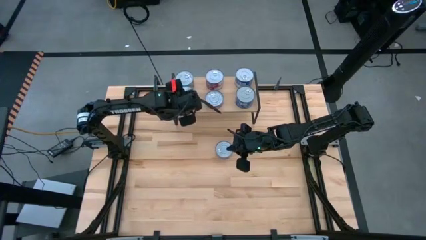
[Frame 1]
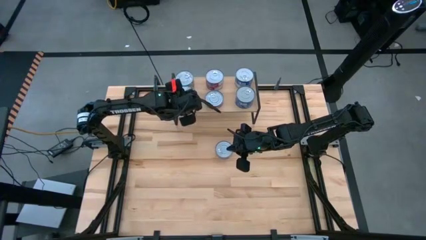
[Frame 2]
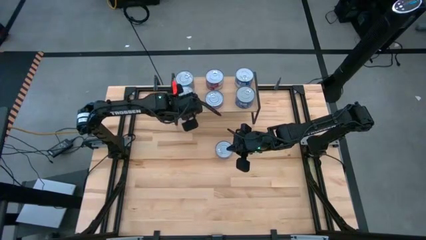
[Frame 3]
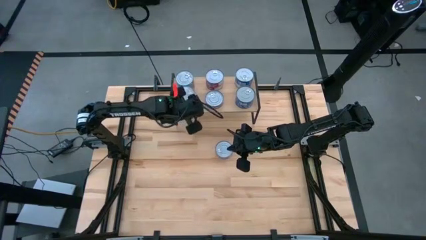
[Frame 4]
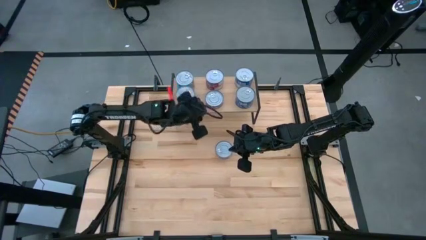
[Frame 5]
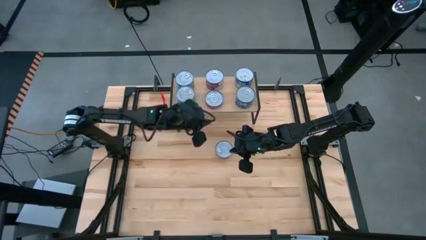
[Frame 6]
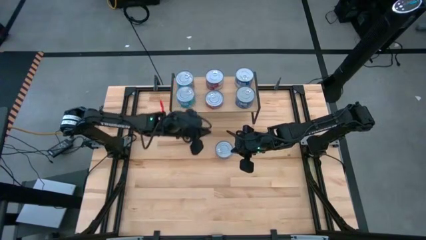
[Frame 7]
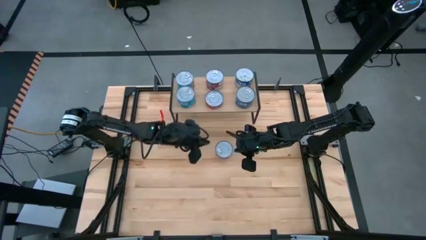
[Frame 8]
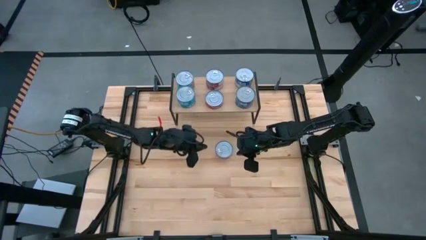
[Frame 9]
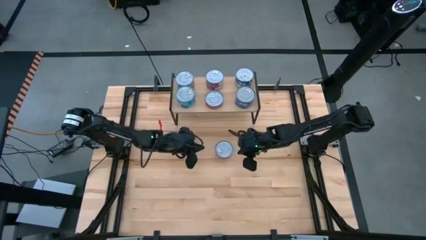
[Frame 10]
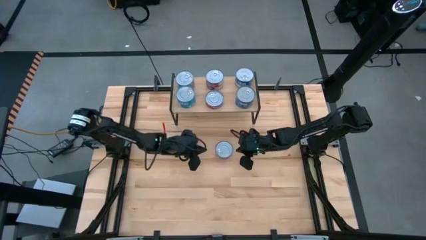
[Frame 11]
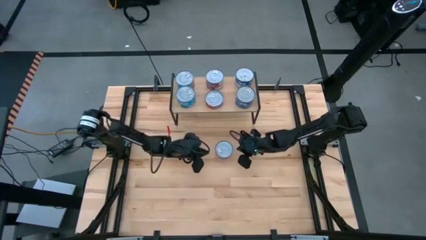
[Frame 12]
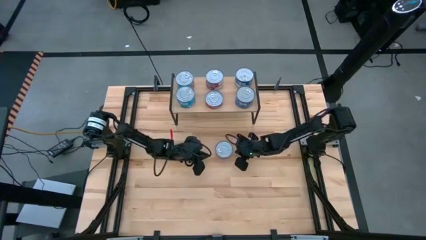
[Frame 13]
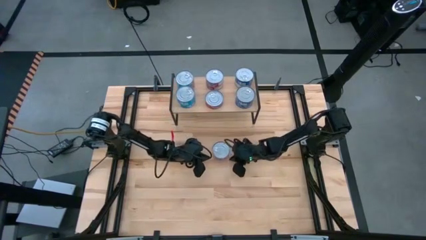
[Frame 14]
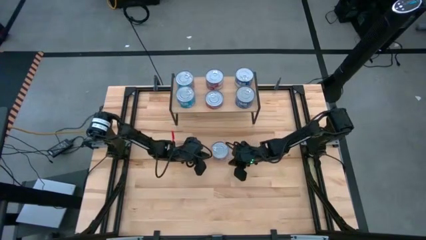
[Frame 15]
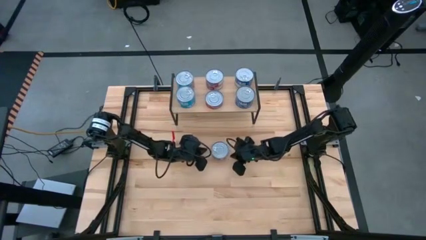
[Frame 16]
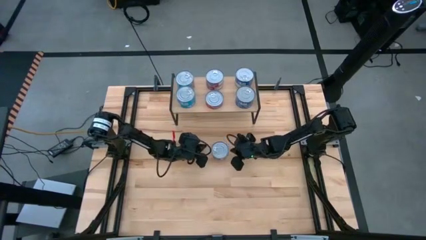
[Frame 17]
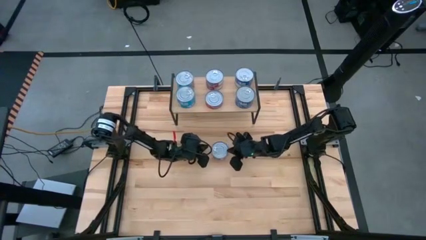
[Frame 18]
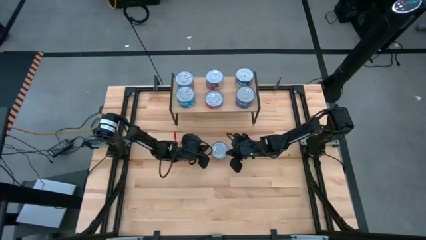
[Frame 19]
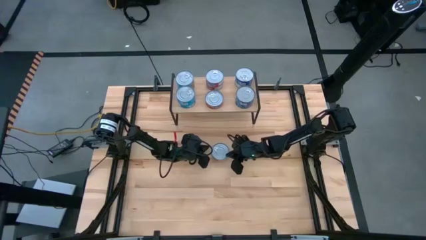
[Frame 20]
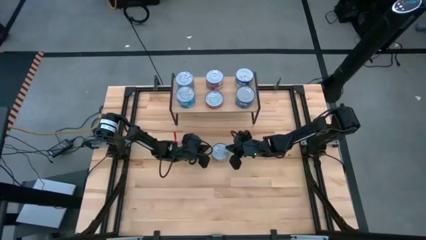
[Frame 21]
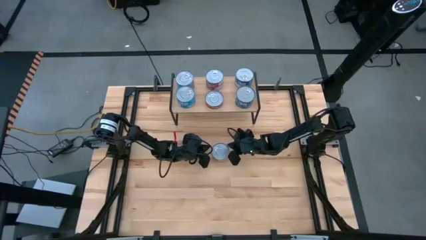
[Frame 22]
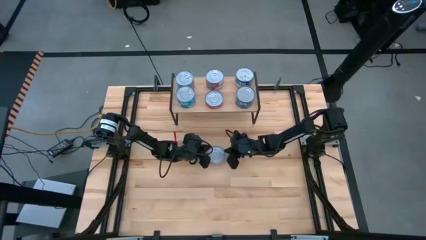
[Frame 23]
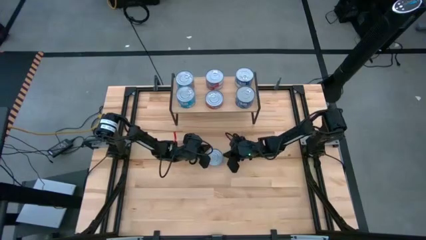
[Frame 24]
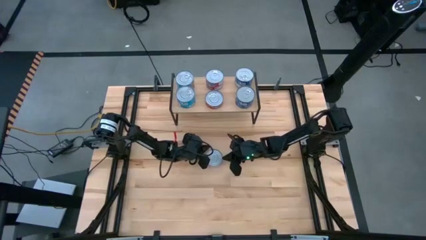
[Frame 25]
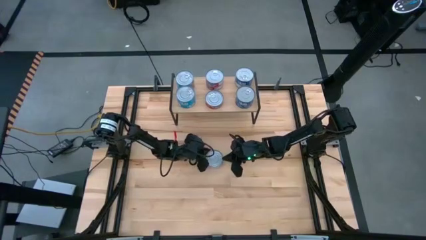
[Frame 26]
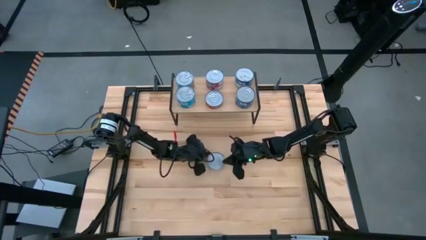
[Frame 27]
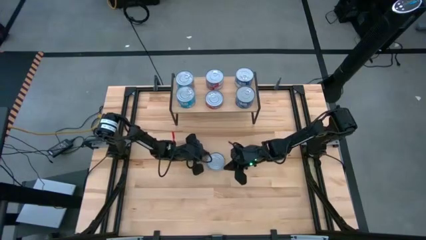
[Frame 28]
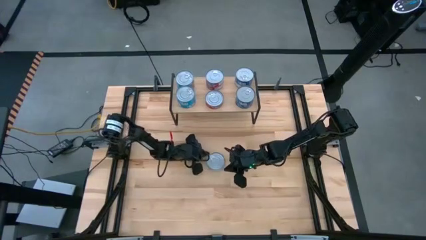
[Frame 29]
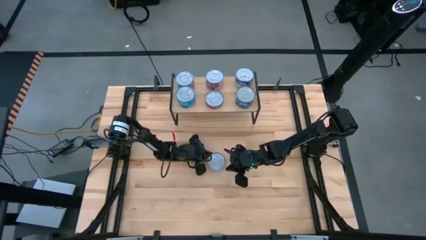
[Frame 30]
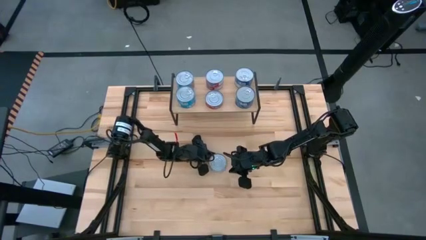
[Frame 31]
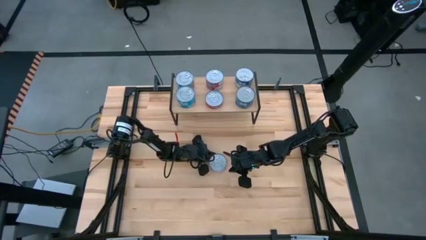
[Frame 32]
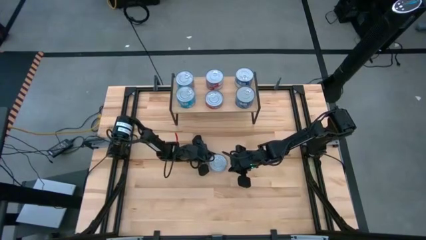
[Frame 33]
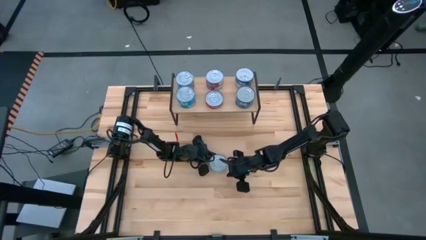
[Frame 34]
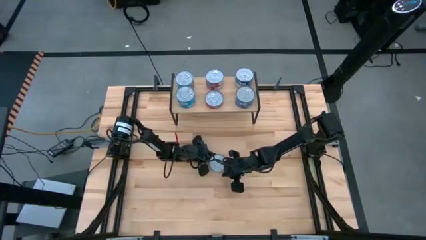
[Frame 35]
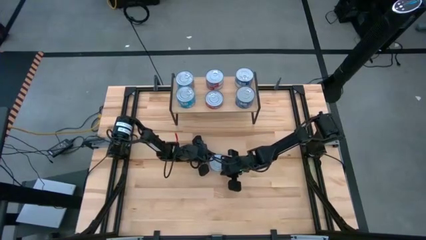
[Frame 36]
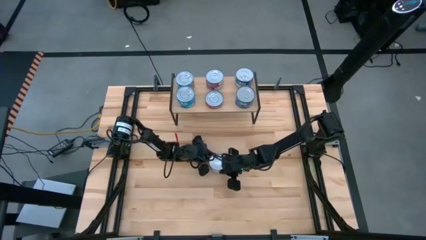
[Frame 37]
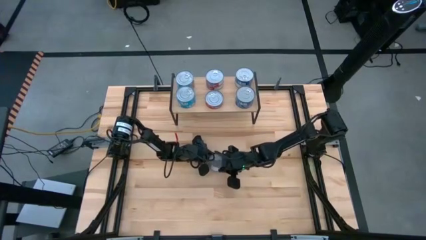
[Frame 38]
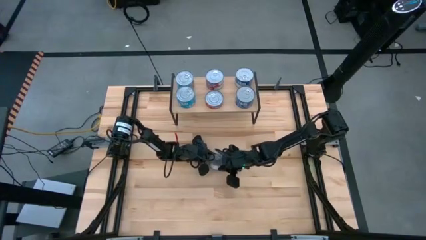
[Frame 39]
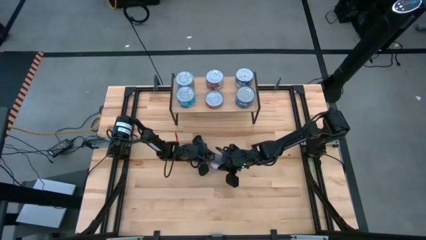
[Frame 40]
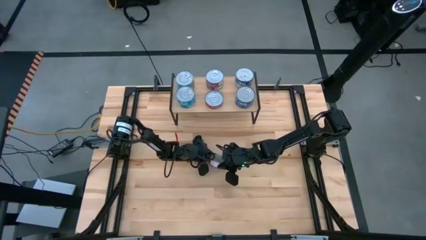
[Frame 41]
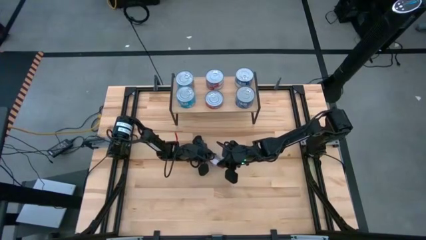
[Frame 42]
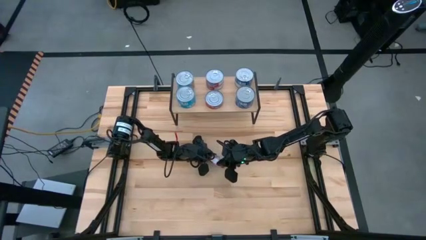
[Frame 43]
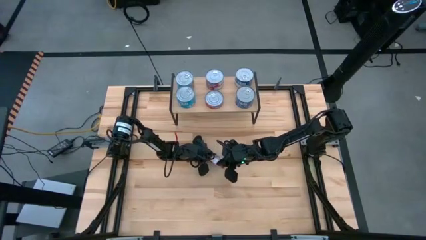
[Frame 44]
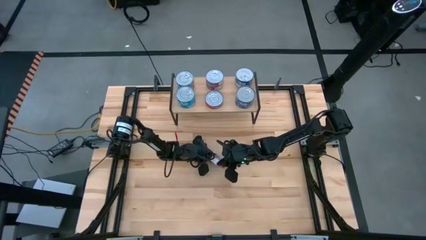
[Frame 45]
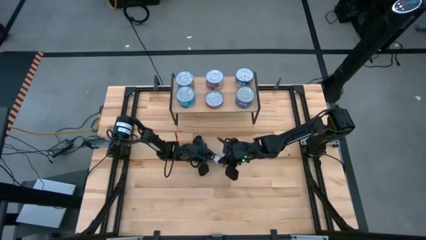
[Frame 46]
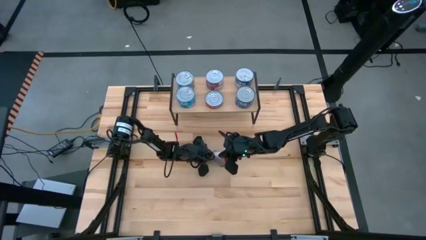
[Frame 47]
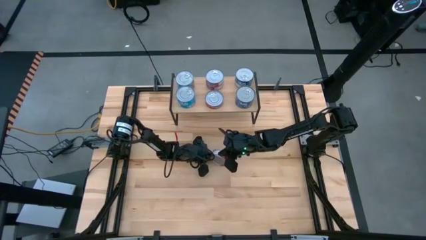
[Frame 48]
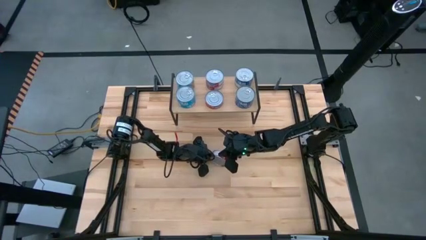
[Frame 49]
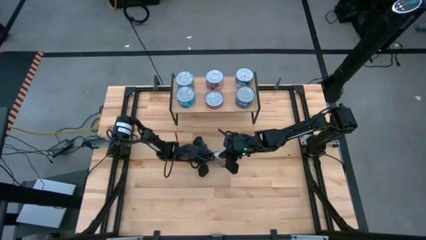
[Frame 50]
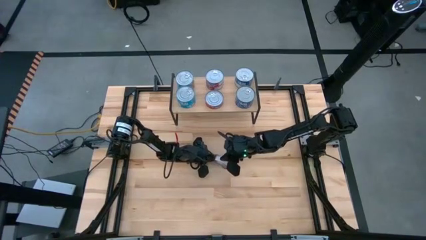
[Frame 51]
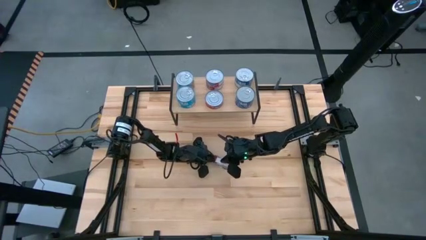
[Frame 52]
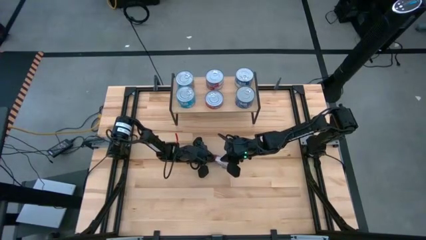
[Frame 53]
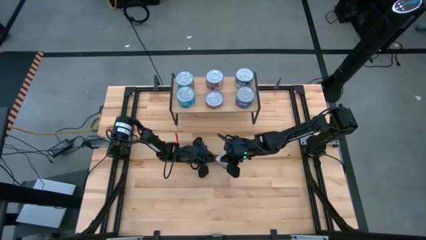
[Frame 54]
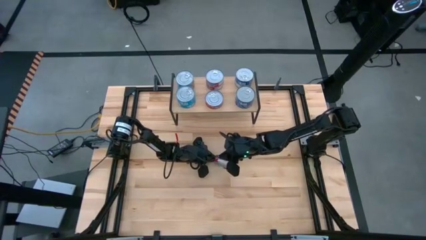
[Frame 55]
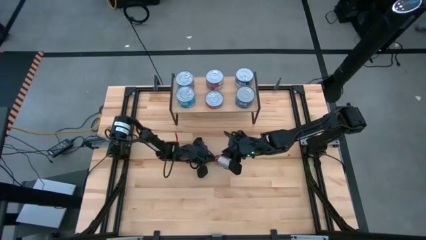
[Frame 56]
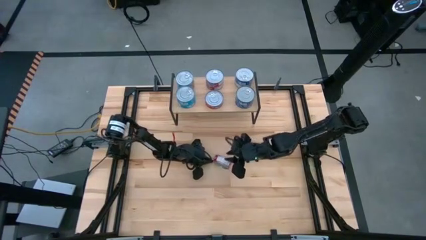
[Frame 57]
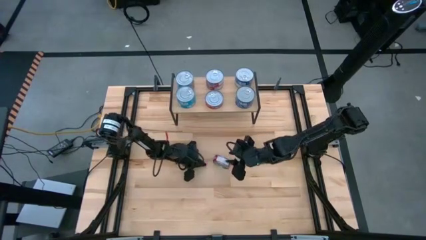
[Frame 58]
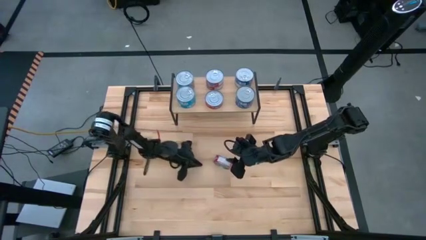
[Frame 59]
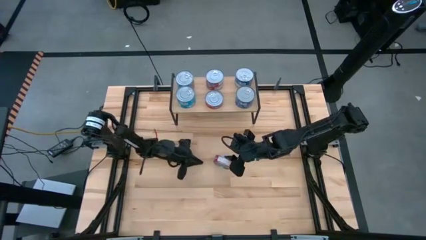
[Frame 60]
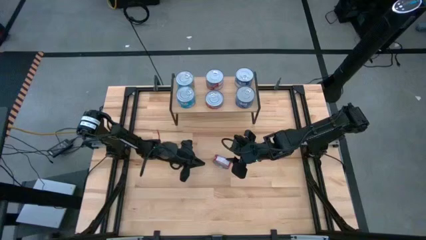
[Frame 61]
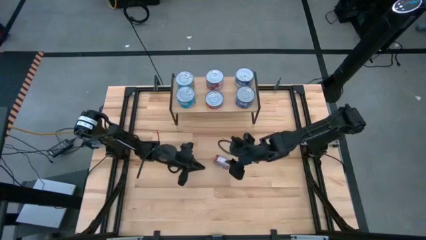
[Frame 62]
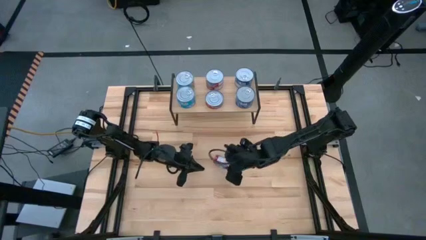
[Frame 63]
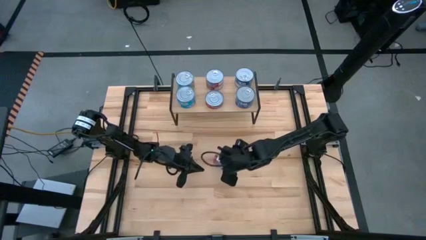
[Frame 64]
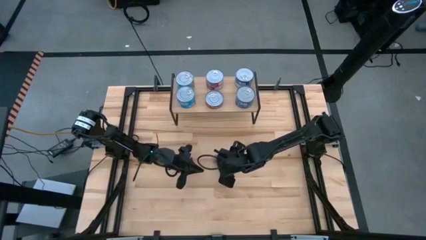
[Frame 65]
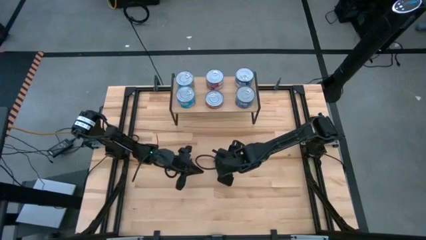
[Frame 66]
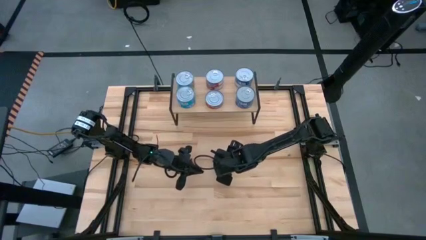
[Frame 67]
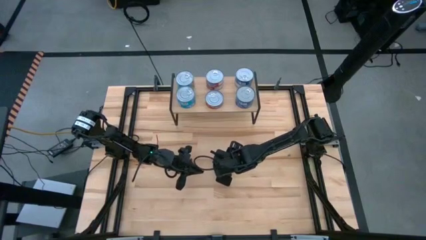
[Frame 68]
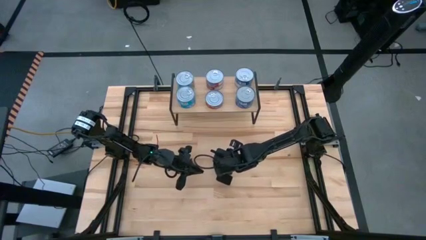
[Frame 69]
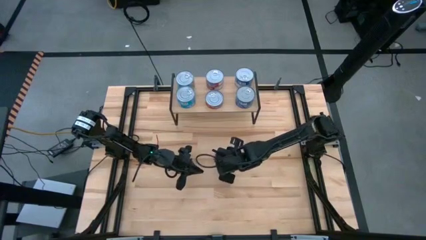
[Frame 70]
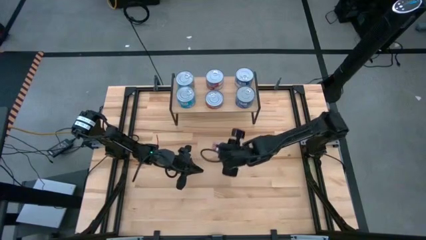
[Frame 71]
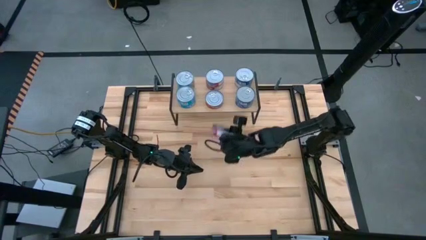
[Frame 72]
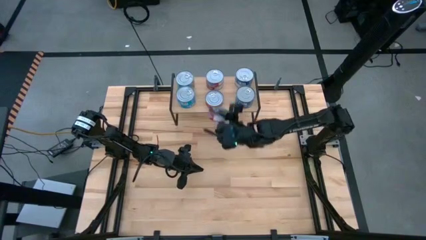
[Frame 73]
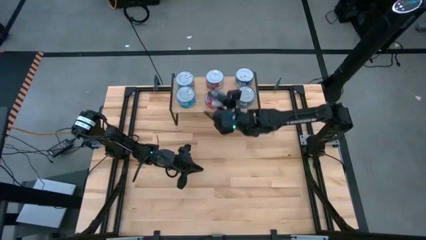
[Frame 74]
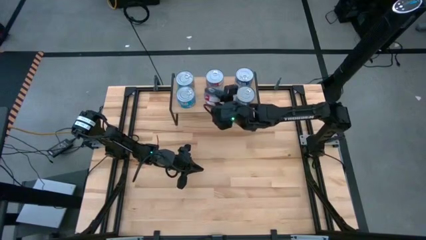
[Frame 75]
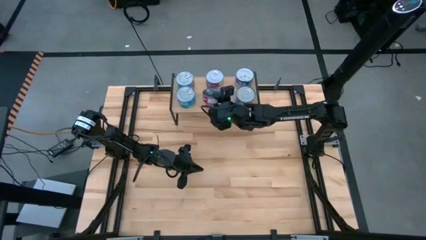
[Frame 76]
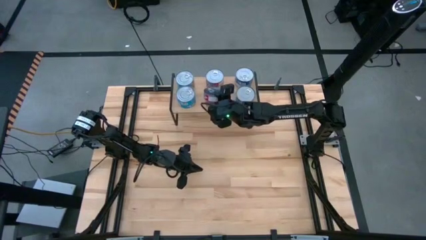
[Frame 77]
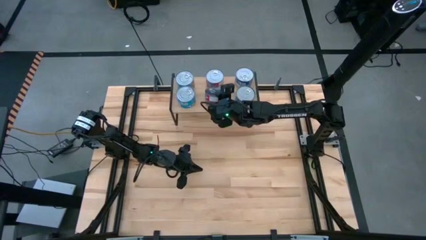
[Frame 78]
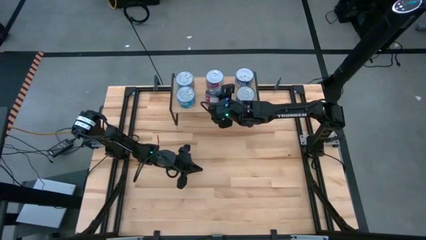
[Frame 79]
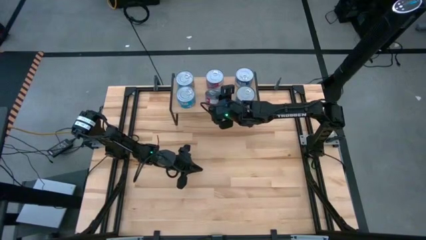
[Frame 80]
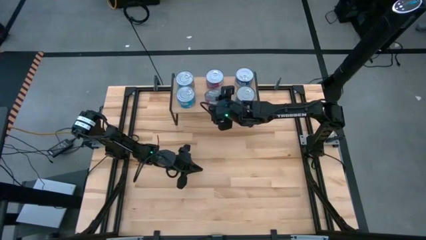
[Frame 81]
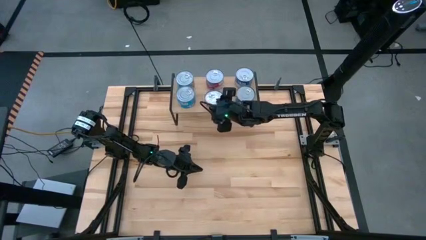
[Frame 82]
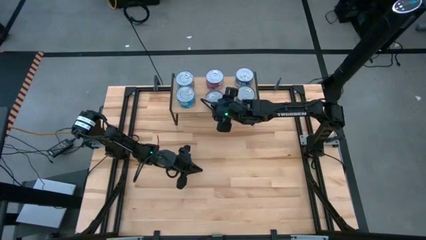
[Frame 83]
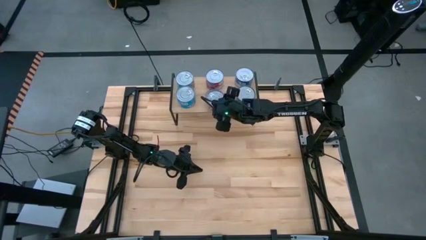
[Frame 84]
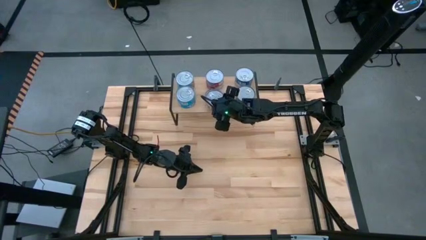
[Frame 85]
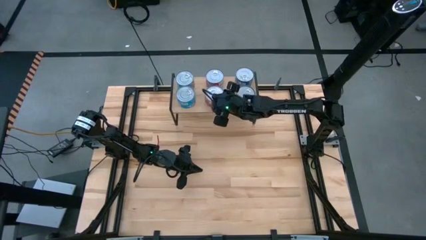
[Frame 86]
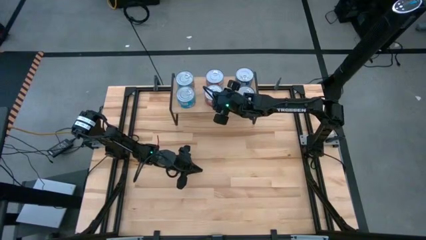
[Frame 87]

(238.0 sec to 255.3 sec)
Task: Stack canned seafood by type on shelf
Stack the red tuna can on top of the other red tuna can on the shelf
